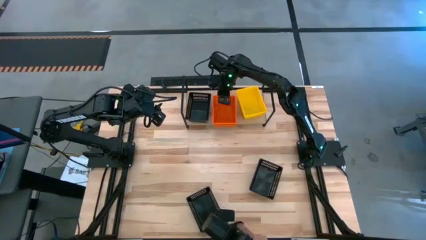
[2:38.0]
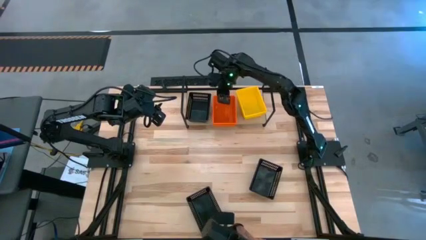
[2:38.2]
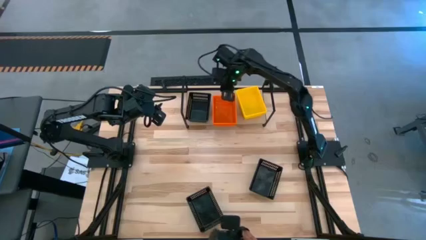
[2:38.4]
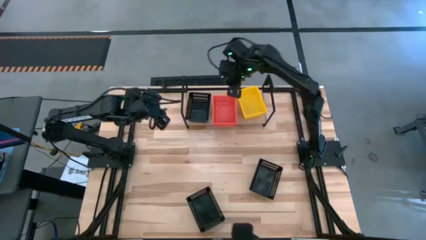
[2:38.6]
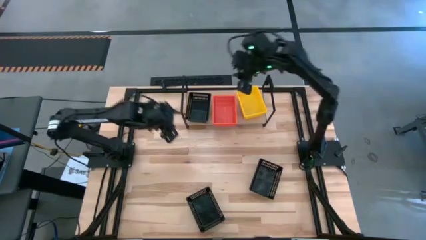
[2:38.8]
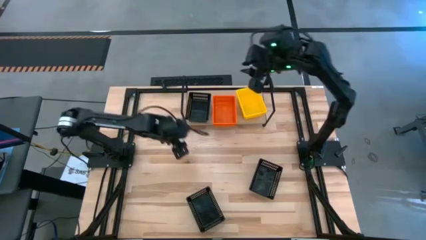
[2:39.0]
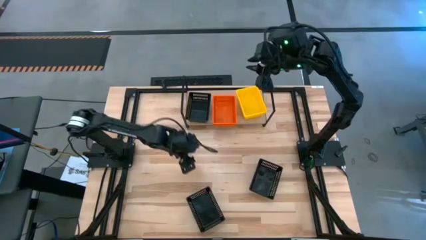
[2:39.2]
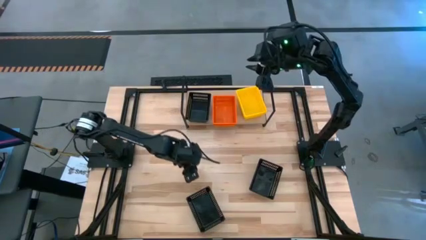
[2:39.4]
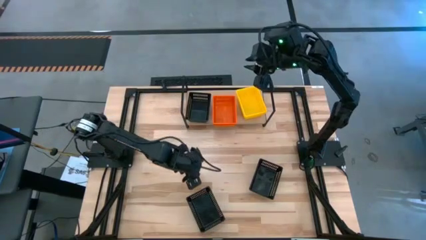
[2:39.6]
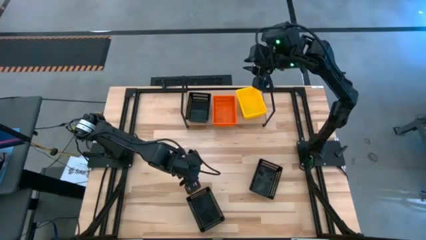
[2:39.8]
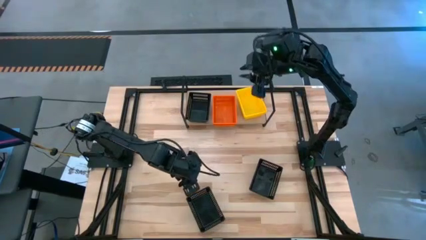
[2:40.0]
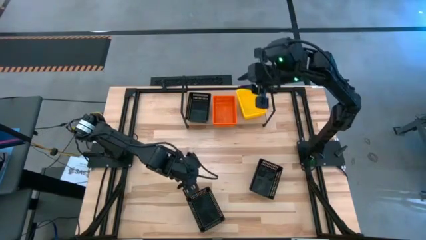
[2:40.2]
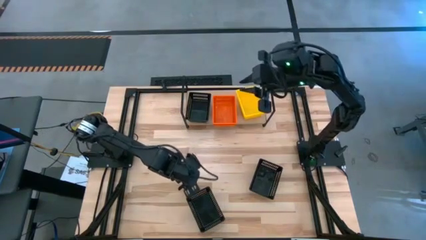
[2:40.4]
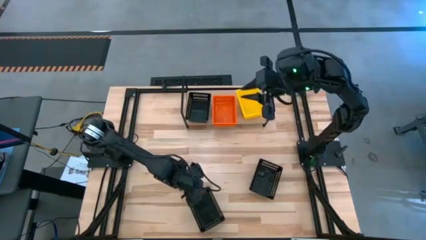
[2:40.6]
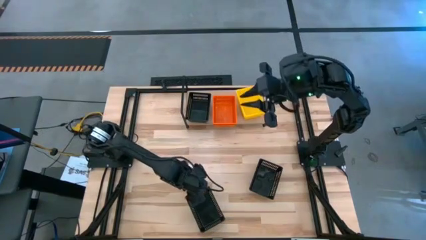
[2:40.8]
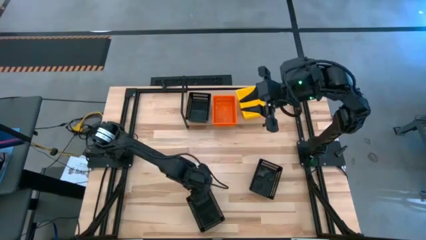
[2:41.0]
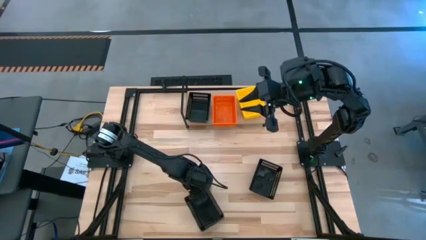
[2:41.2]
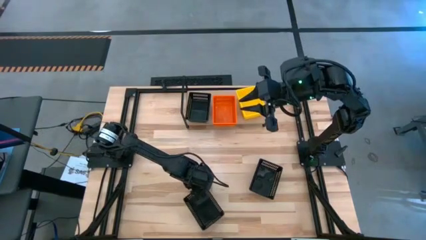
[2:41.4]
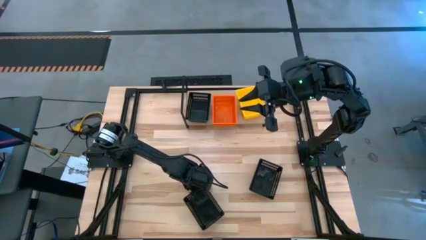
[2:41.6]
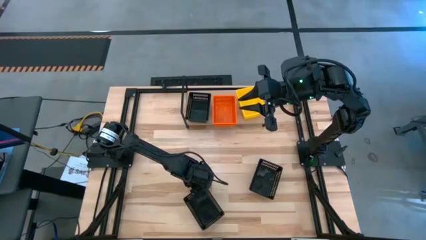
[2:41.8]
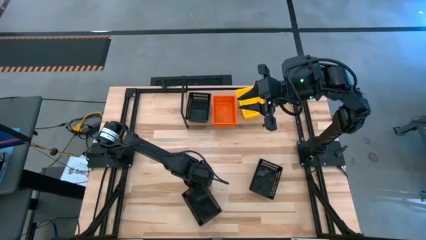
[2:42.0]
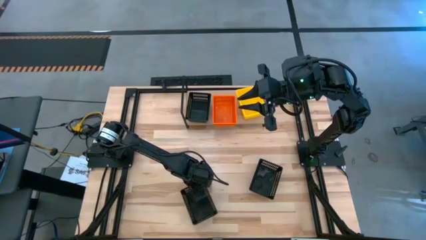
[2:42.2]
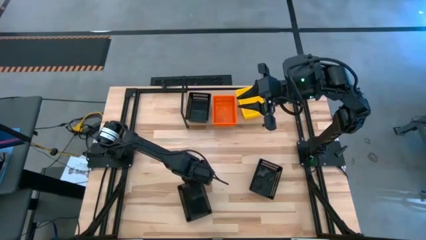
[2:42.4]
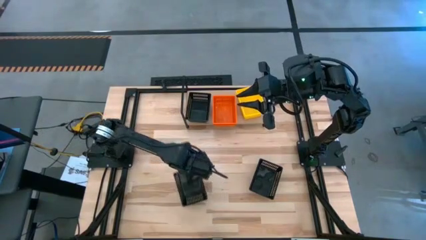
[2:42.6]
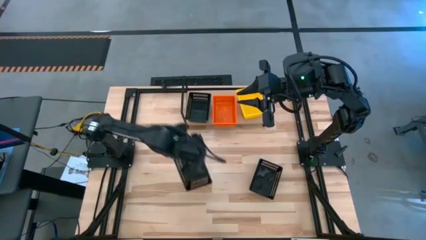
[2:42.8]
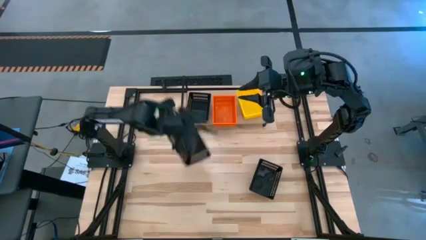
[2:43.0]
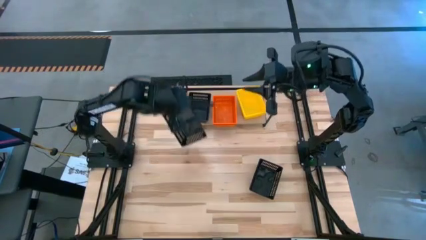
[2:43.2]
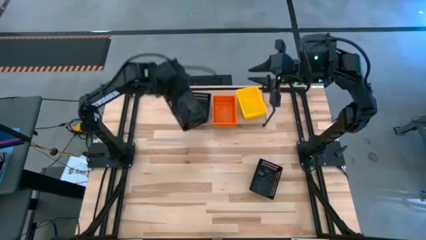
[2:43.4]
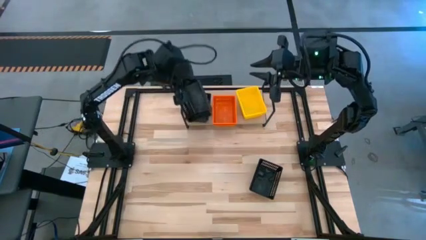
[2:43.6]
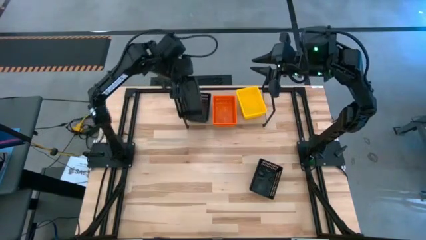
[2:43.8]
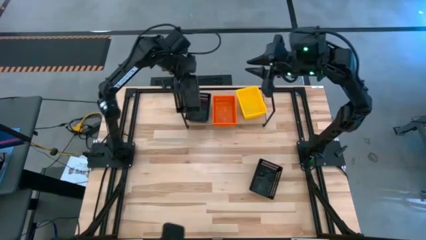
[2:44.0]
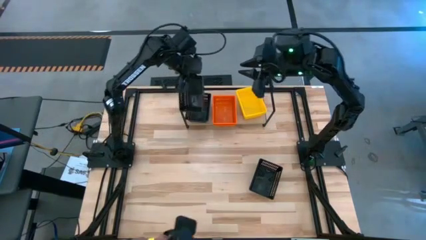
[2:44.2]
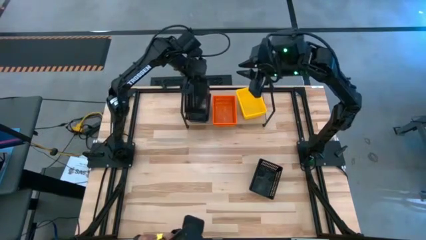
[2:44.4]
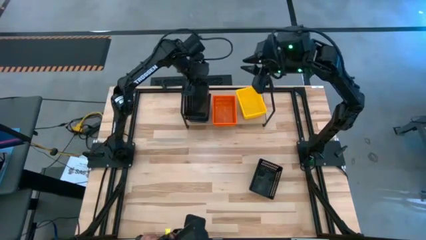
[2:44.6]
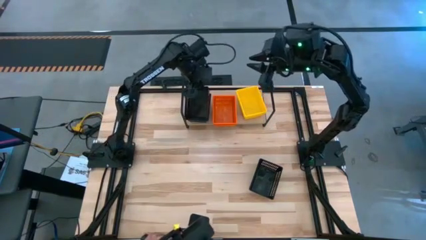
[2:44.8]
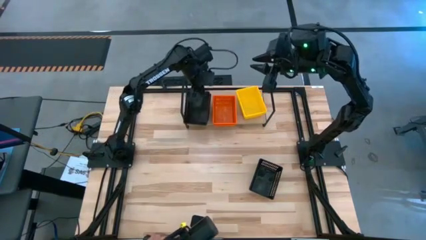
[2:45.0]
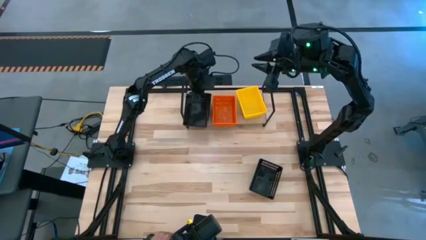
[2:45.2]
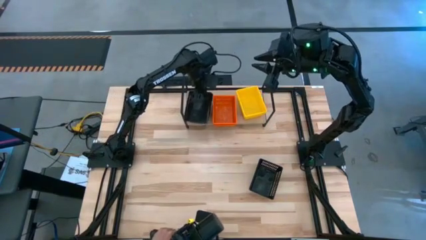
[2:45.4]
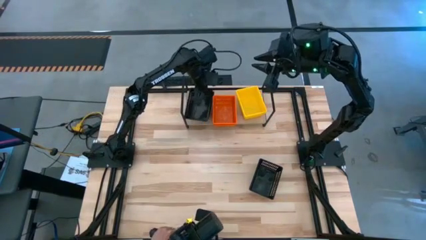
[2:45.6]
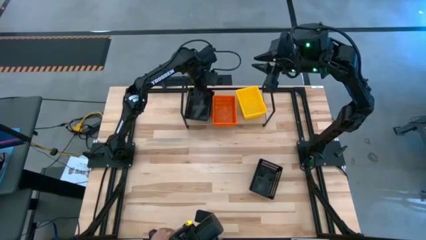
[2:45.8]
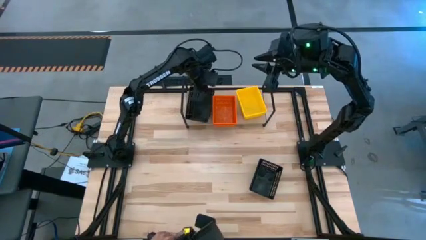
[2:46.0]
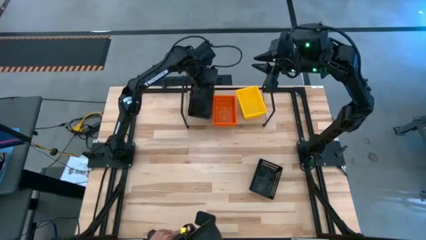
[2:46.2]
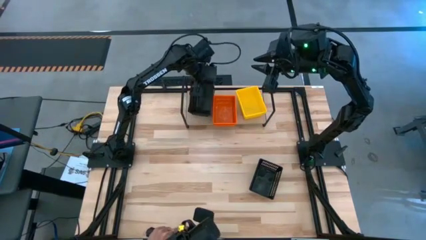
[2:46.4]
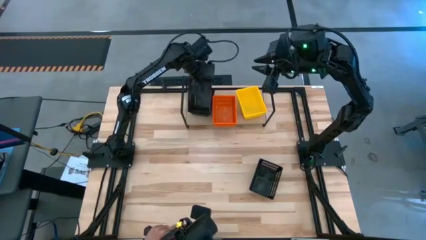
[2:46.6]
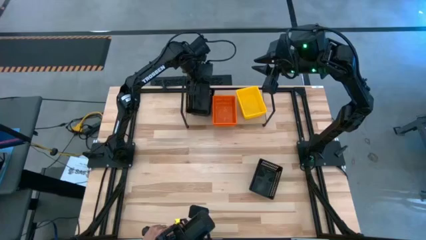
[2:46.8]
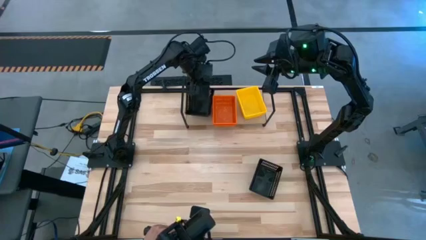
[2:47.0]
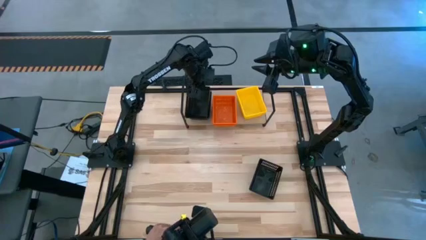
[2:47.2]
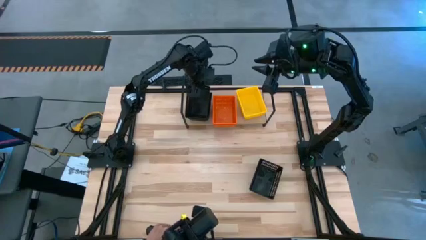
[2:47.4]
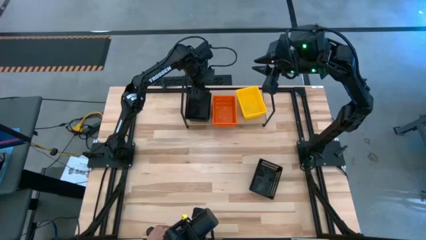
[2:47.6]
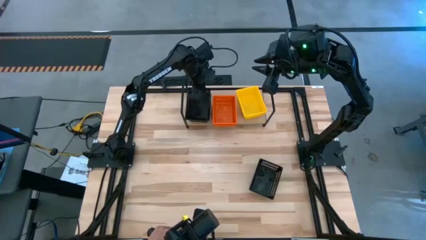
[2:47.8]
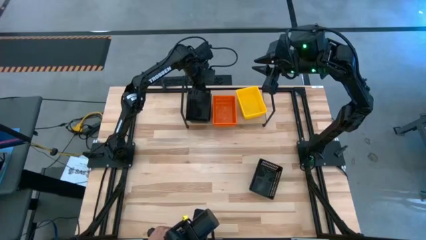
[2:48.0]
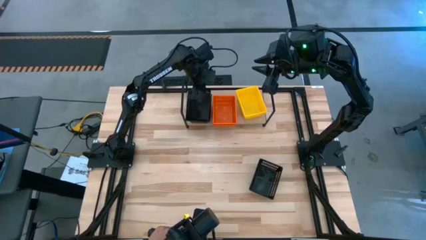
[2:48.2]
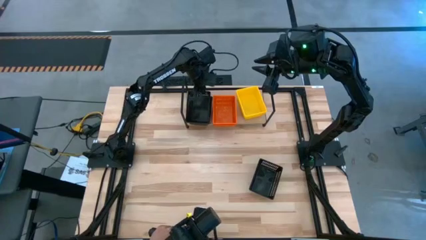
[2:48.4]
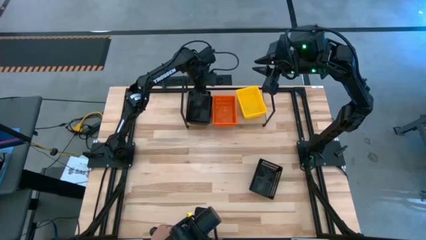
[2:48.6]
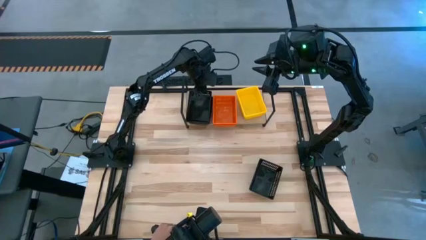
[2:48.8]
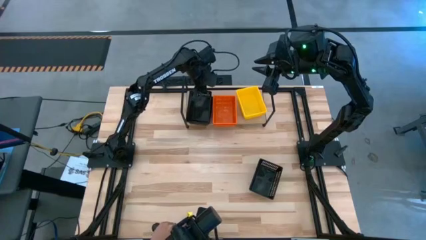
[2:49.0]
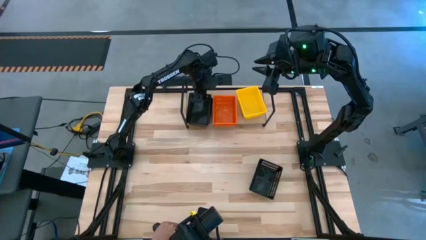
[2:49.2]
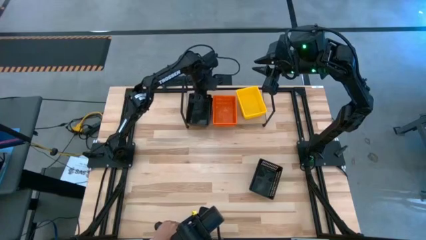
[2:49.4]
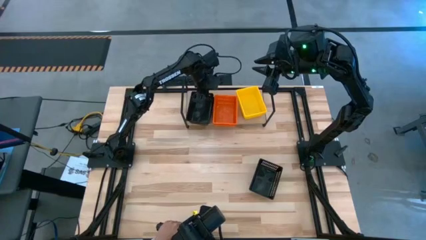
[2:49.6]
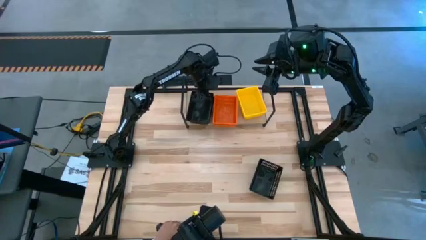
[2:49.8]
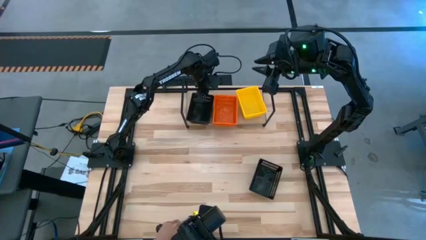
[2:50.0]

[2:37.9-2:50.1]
Task: Stack baskets on shelf by color
Stack the left black bin on top of the other black bin on the shelf
